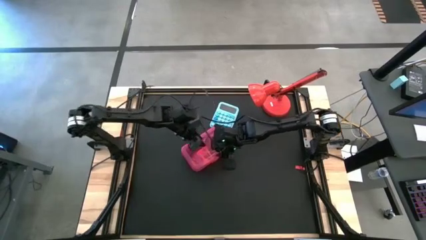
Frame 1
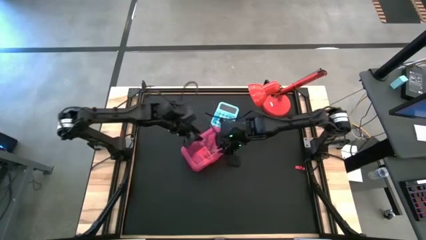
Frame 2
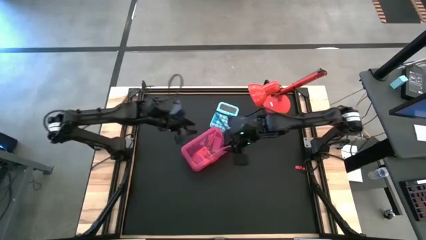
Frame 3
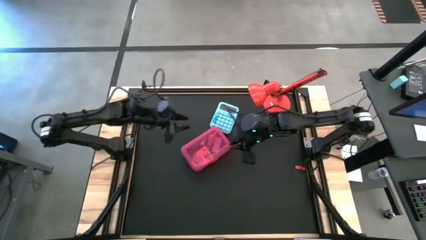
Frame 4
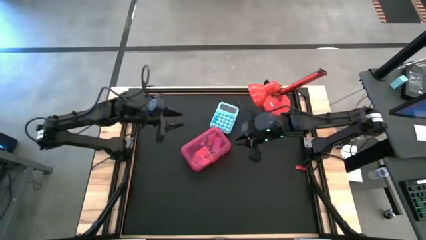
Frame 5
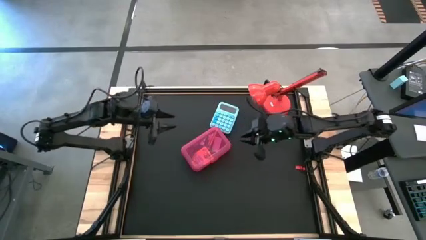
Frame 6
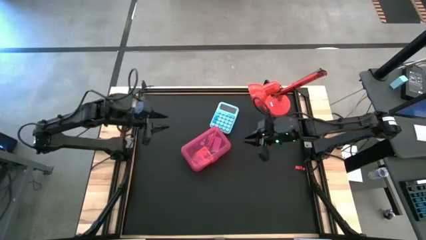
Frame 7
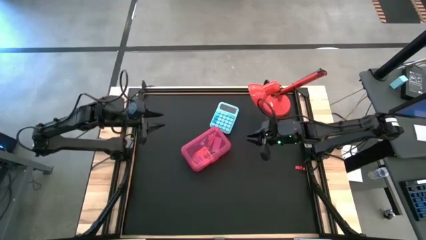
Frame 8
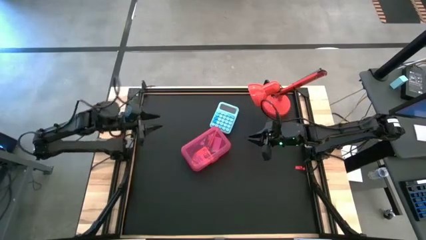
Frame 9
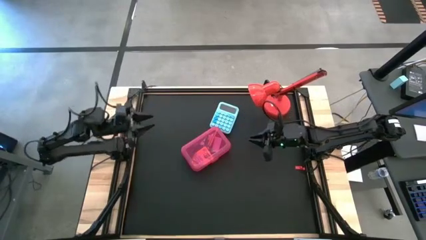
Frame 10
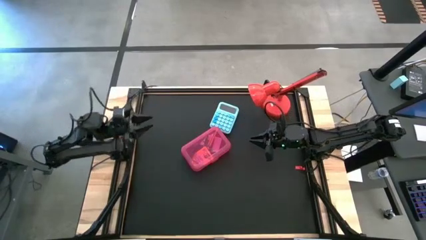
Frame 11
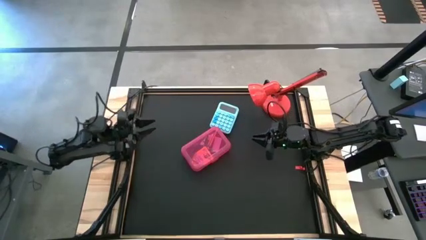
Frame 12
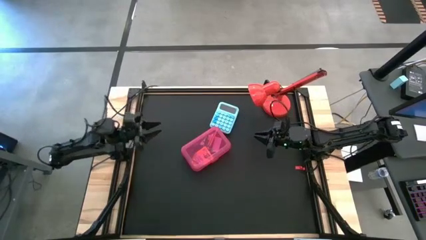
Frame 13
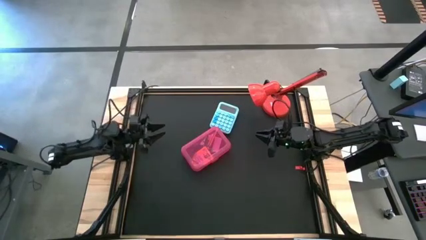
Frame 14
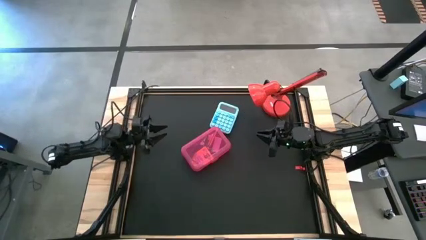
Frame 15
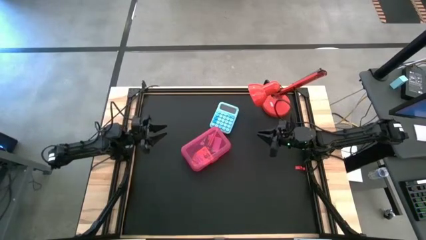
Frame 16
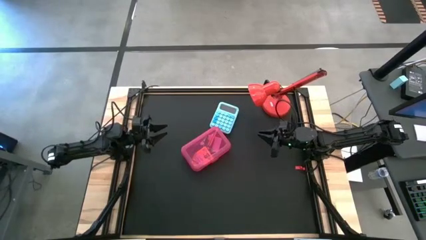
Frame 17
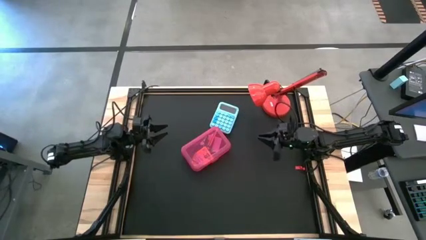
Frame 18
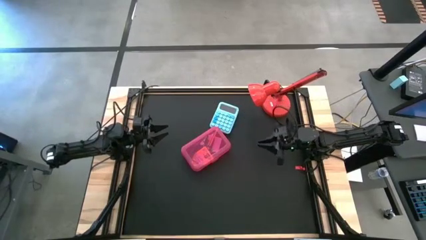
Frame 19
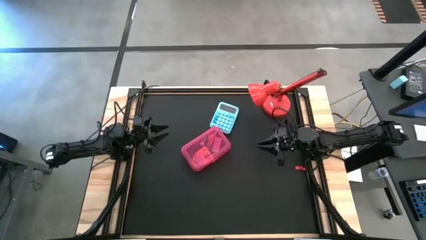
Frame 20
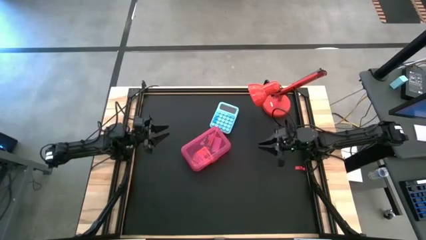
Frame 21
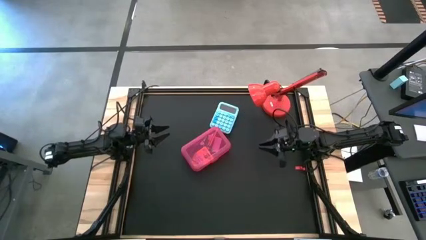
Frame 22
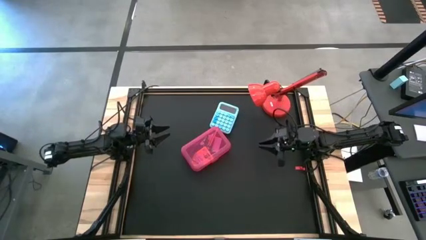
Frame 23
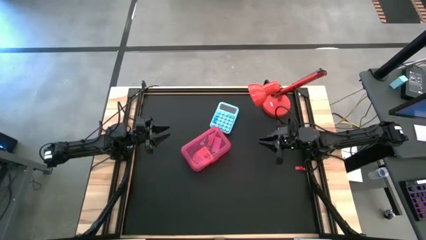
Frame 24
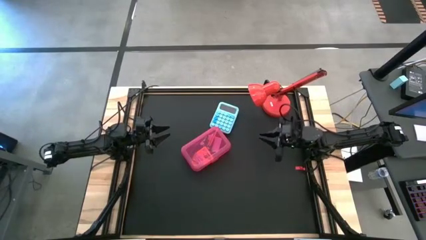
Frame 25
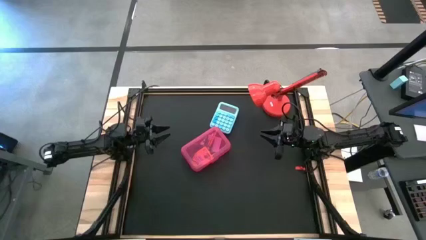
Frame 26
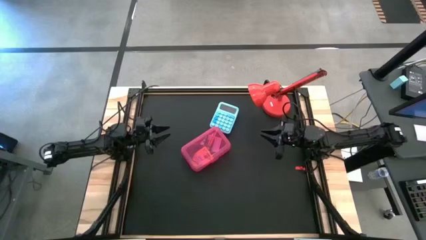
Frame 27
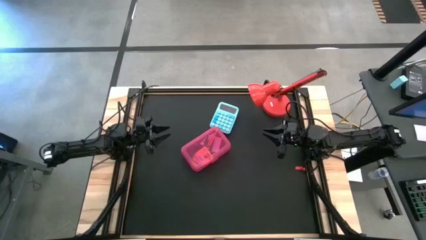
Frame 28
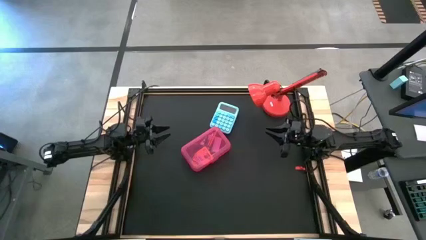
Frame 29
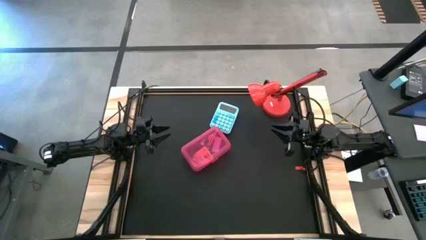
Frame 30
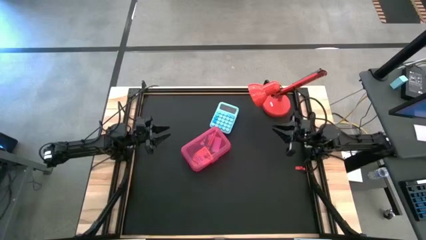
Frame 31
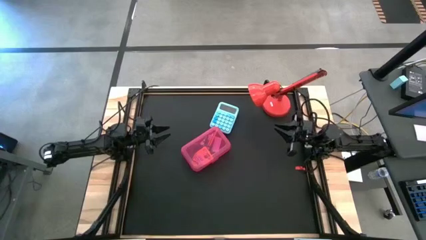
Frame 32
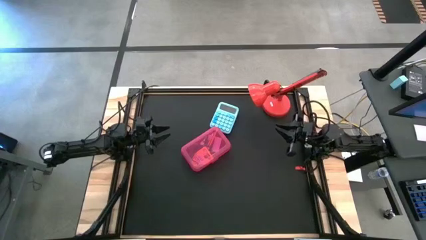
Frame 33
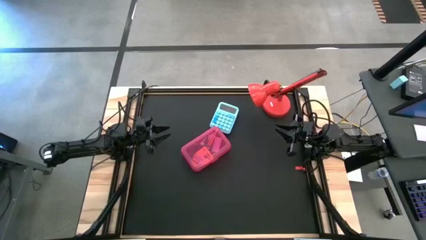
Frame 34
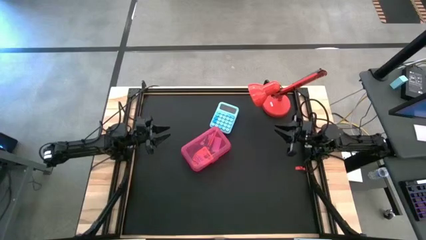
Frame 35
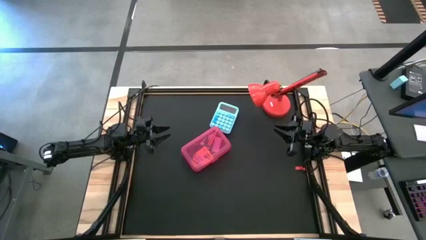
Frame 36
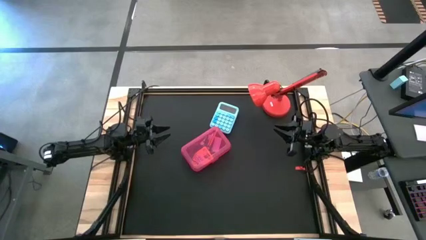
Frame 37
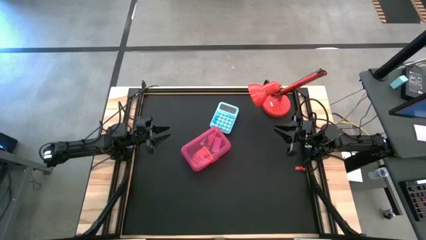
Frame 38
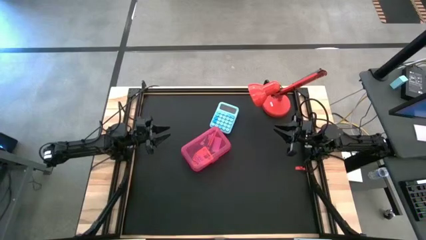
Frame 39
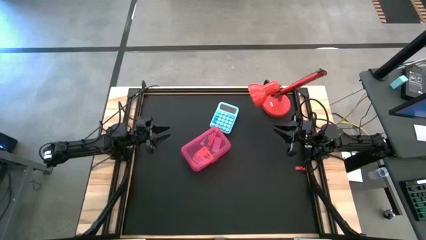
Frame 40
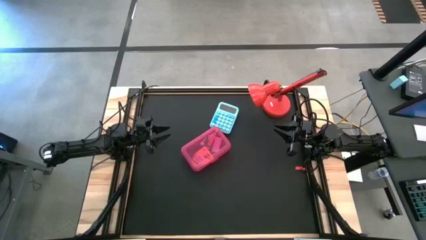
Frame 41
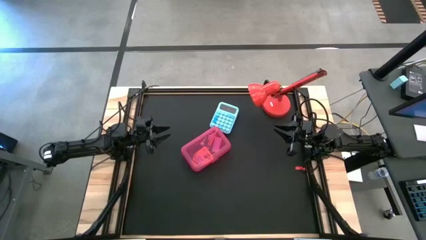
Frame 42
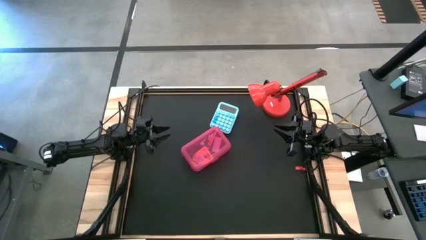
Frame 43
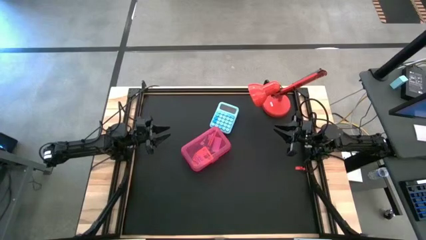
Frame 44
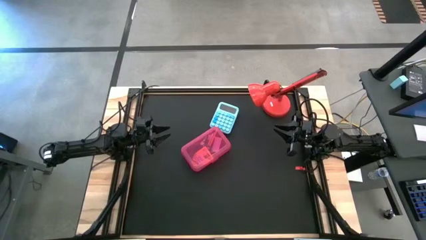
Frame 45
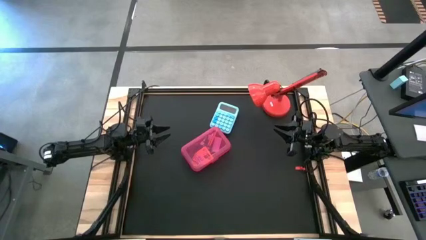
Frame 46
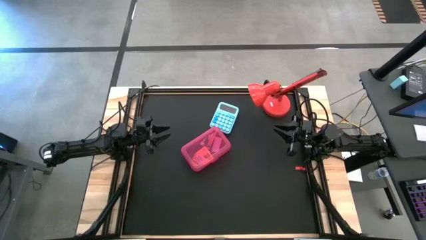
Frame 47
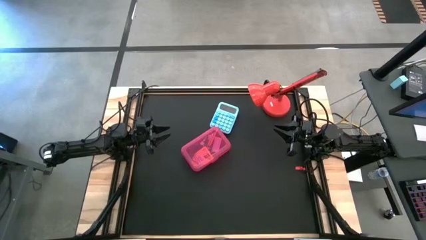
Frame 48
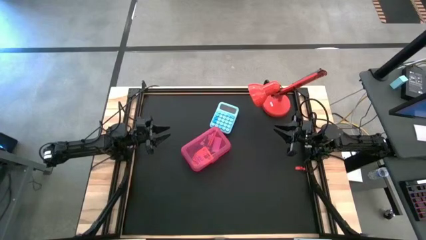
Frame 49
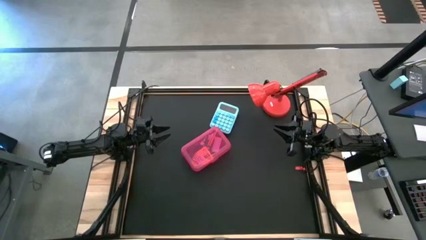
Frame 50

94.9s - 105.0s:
Task: Pack school essentials
Return to Home Position

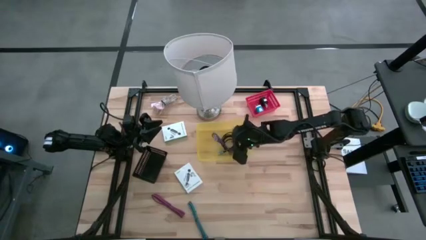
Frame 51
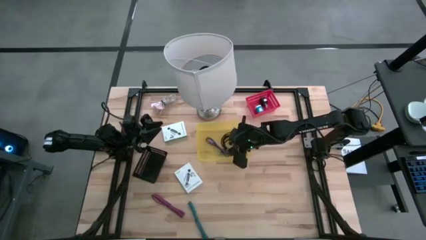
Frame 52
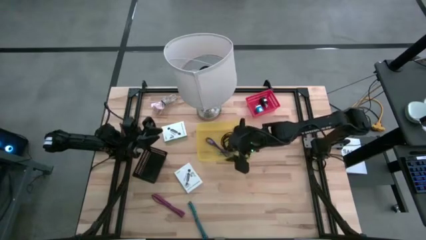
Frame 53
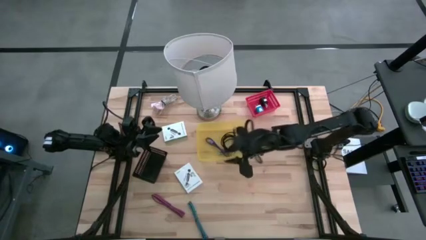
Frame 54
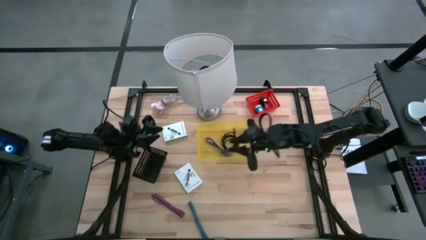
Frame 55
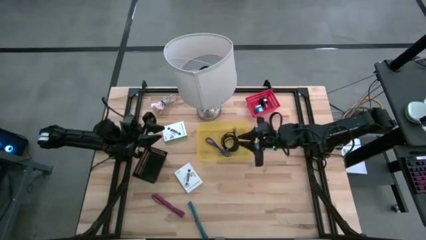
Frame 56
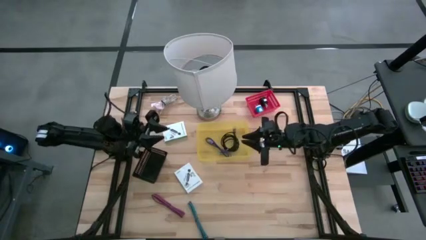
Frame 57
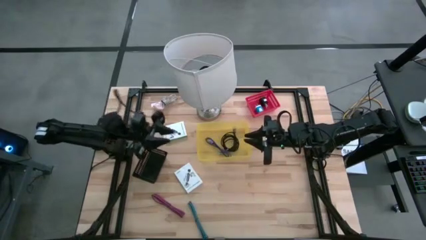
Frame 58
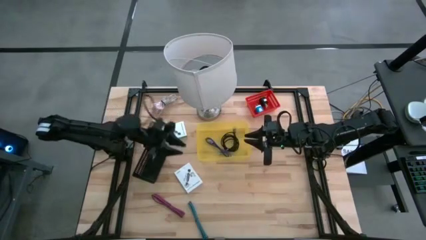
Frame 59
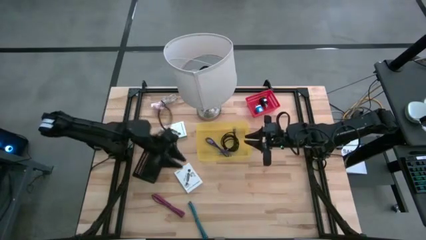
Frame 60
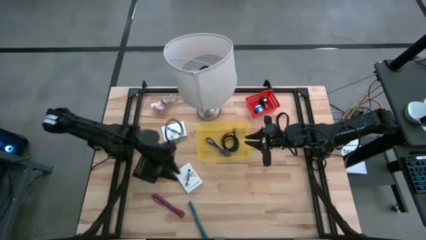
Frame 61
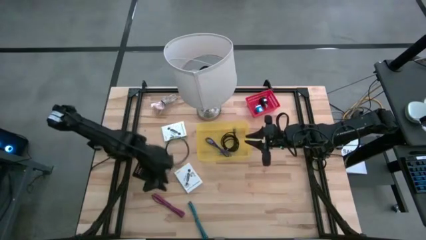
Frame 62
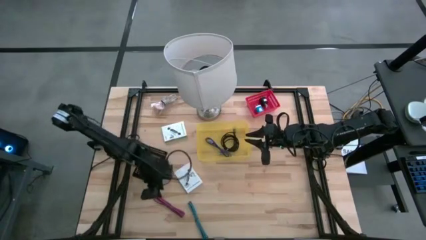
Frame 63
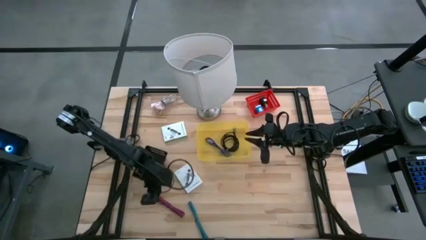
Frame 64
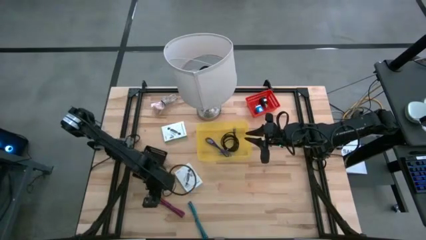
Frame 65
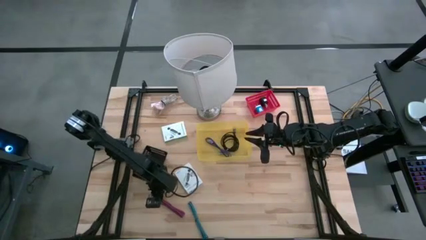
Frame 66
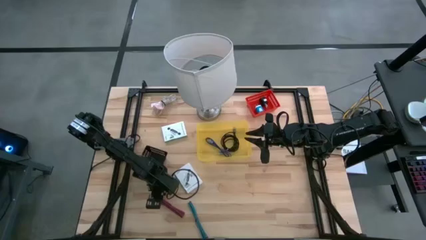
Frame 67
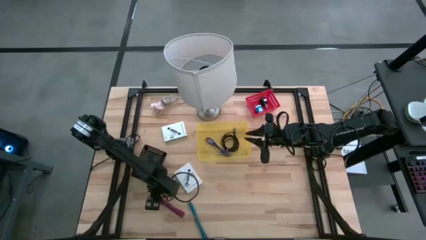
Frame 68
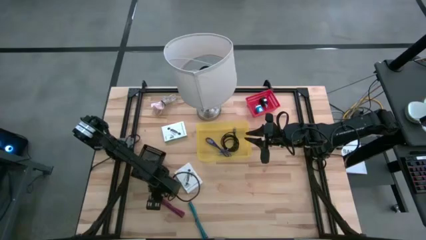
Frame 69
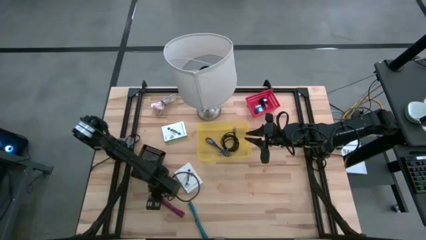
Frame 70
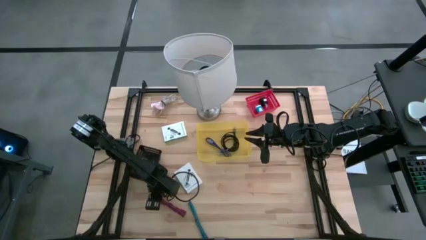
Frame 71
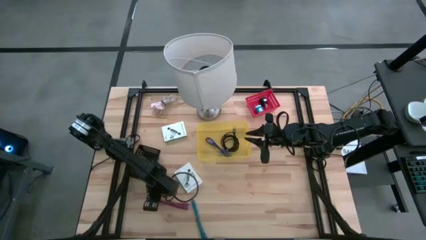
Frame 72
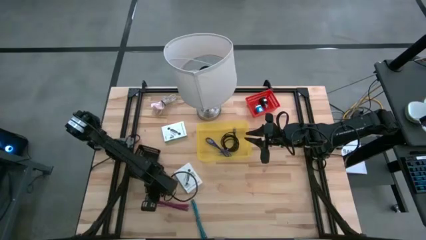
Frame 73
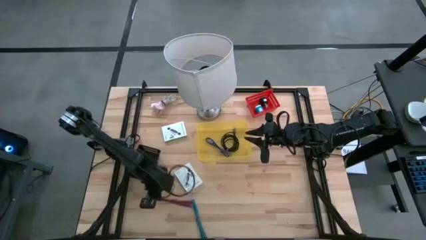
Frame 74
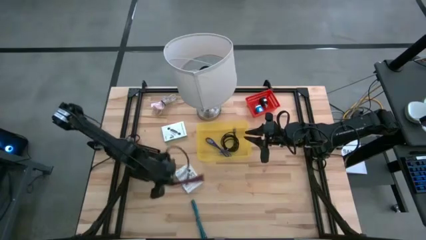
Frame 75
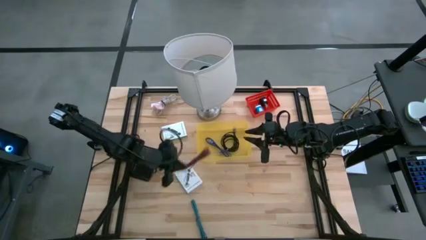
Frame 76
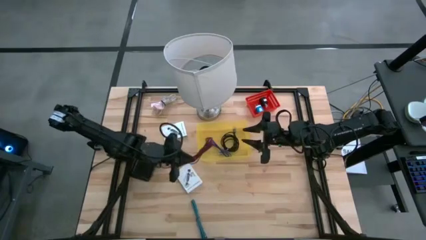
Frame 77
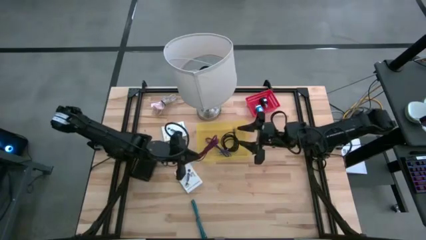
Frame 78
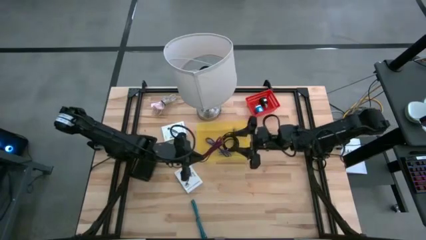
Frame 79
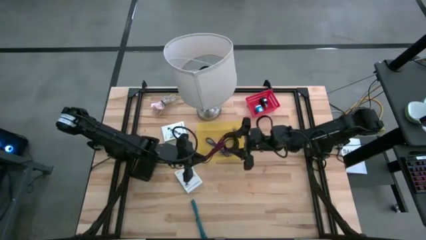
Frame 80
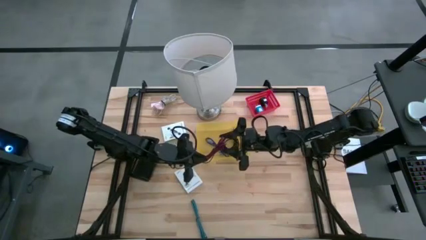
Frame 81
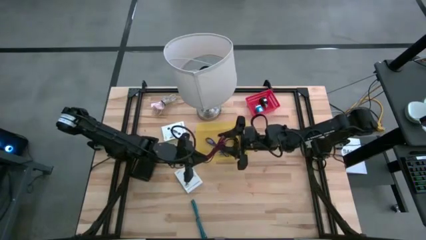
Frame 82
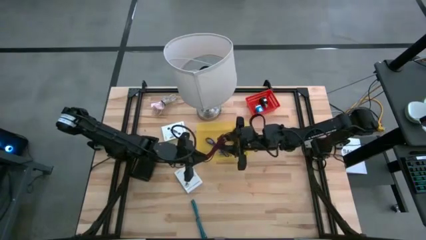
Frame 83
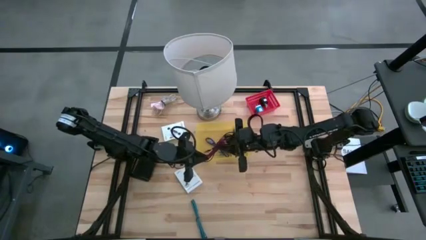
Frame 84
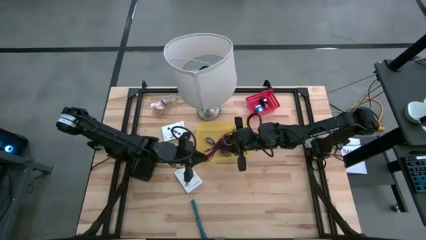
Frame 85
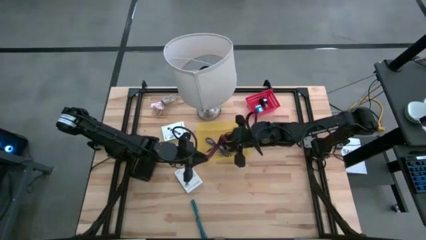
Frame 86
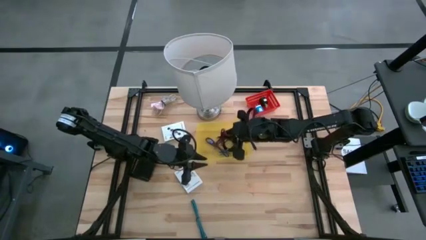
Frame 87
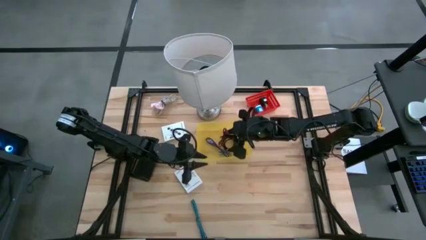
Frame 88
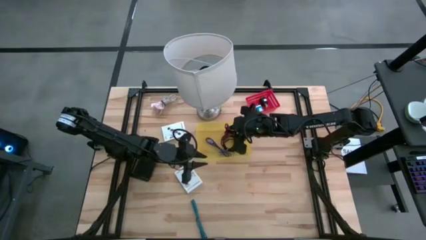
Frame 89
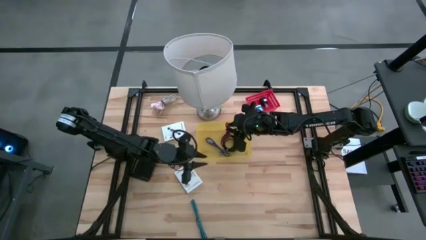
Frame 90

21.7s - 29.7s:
Task: Pick and place items into bin
Put the pink USB cable into the yellow bin
